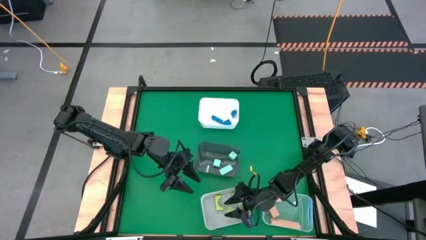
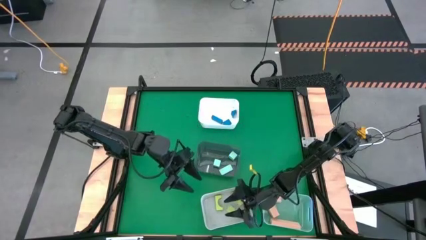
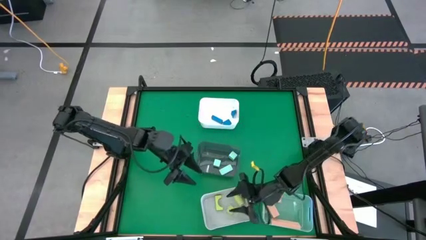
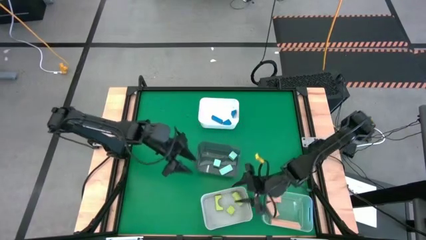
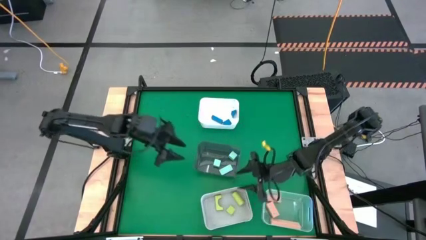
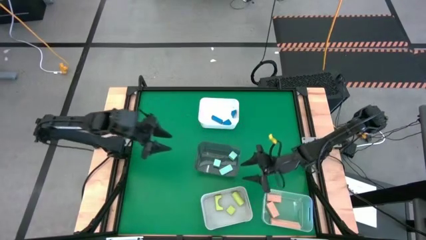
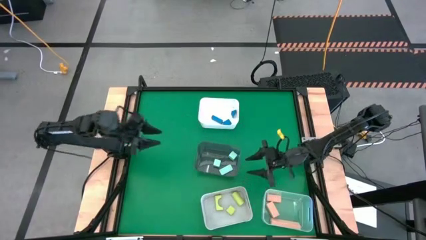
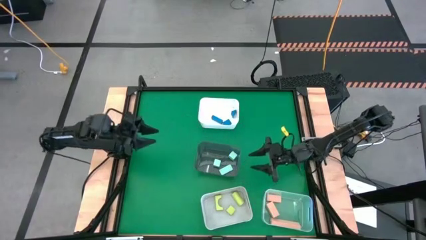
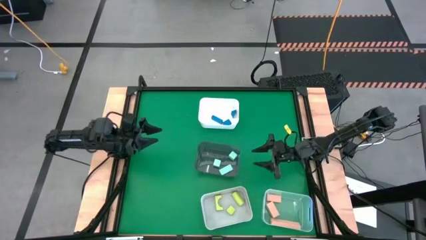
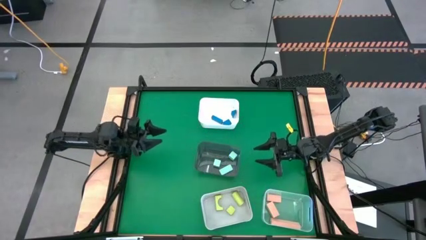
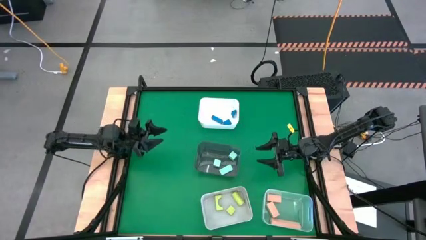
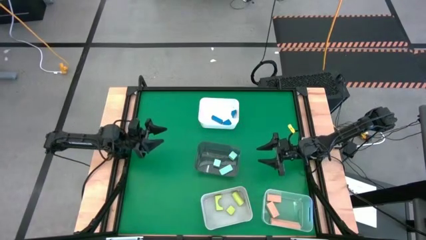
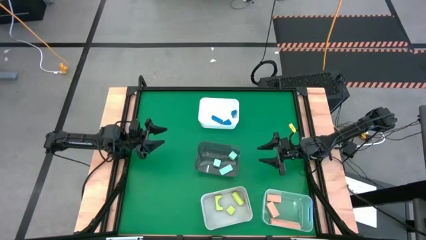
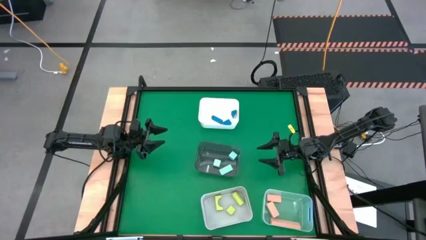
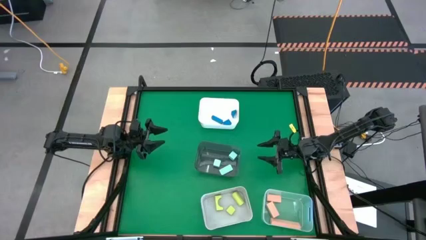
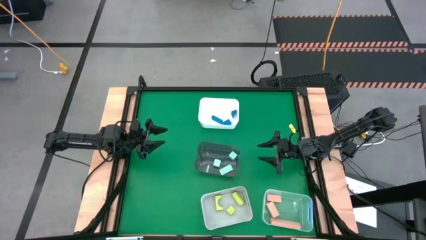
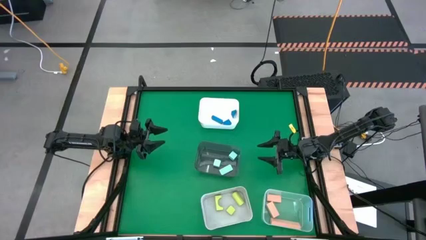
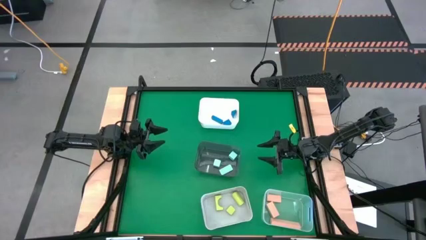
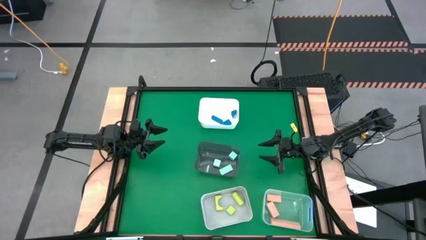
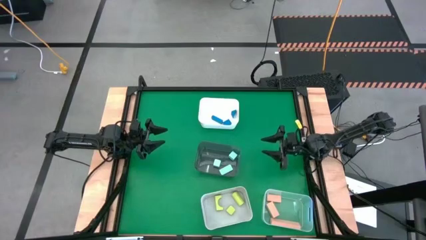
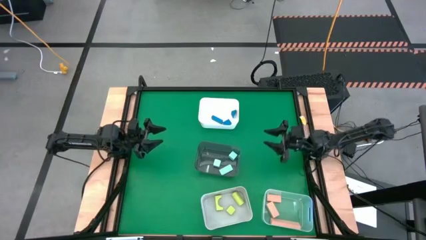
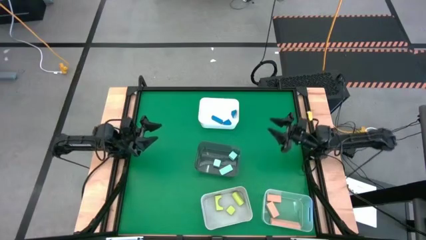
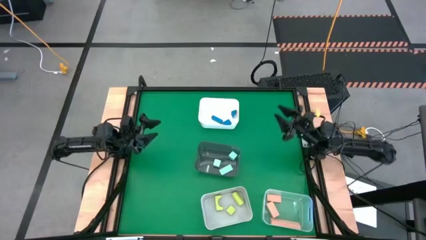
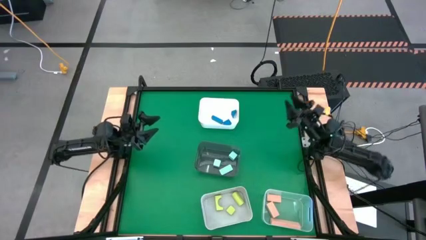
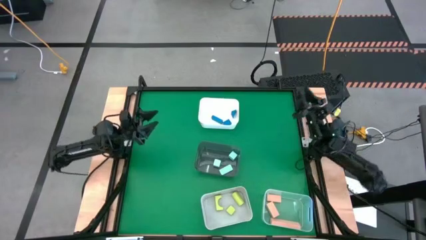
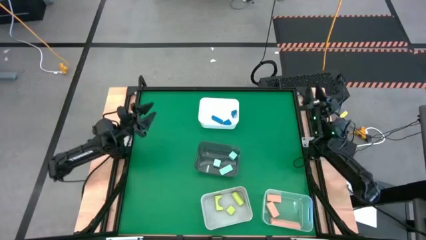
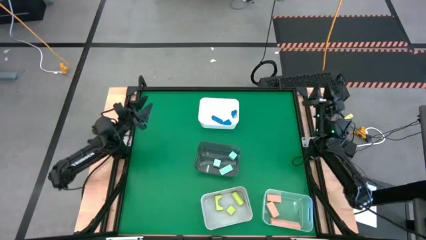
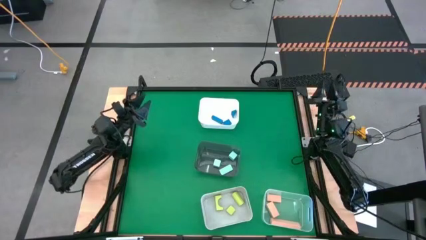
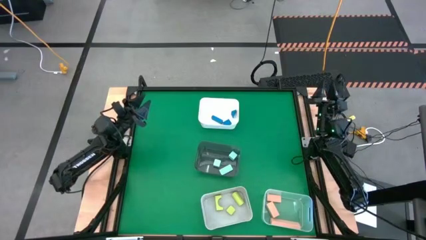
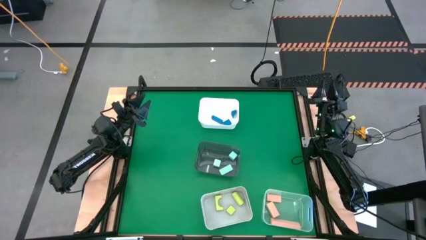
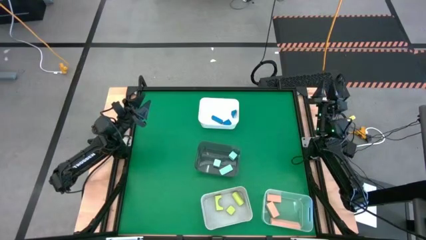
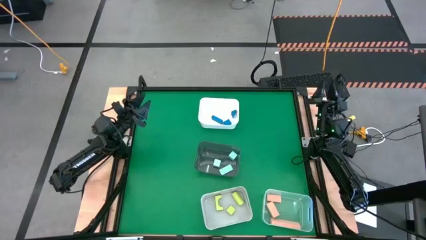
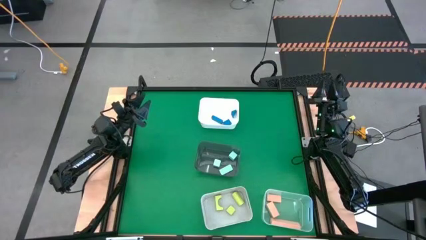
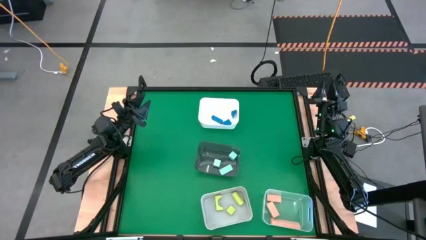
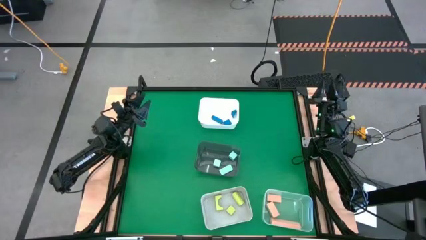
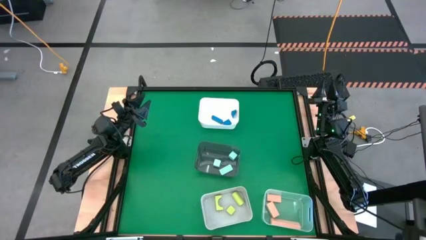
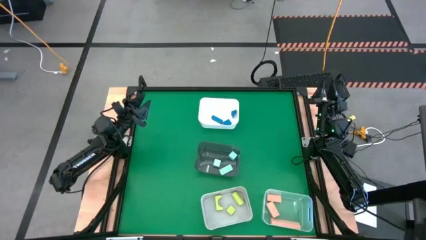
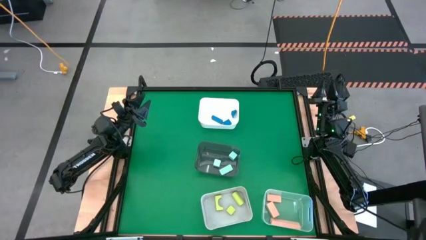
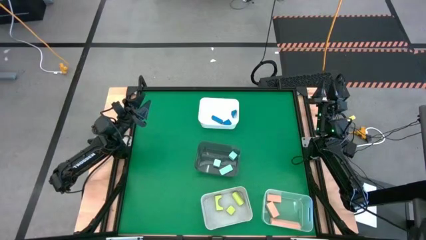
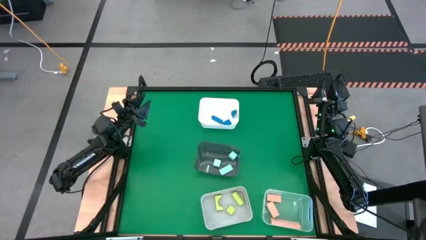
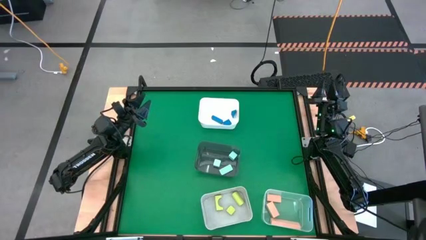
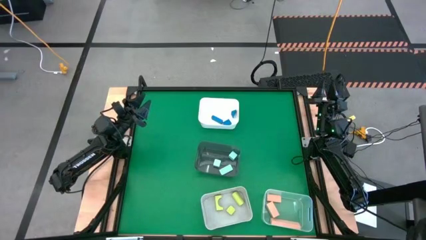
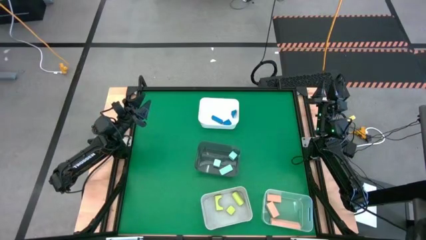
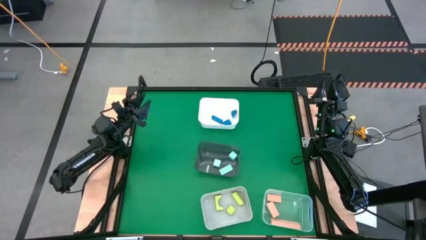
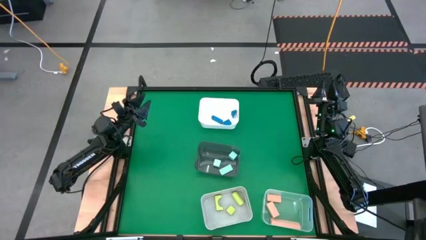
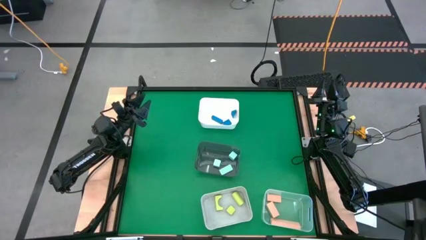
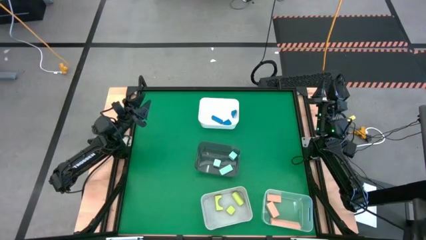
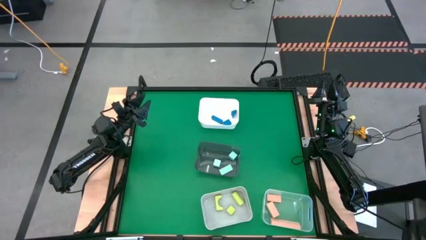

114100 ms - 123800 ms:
Task: Sort & place blocks by color
Return to Home Position
